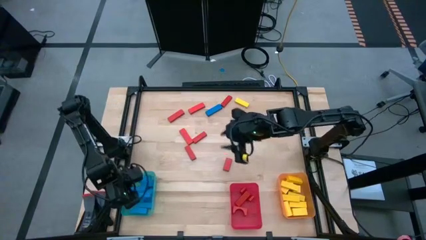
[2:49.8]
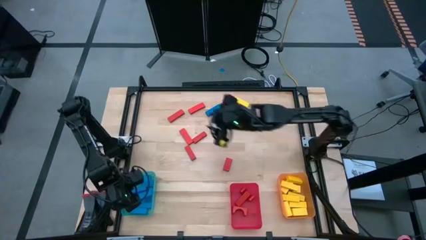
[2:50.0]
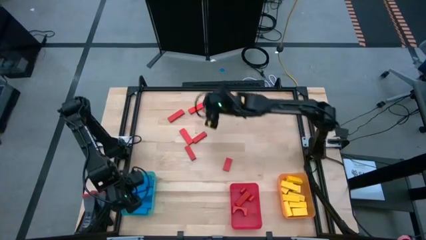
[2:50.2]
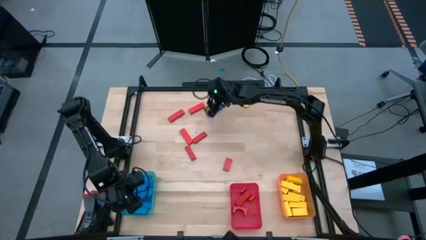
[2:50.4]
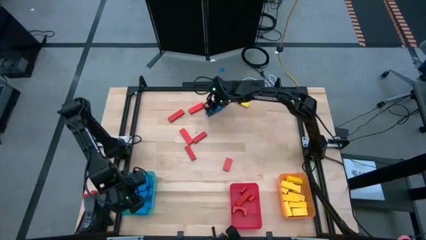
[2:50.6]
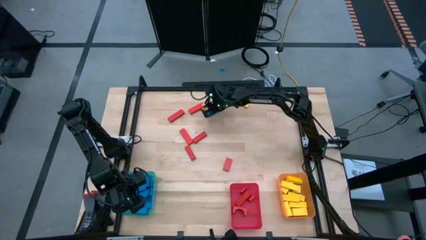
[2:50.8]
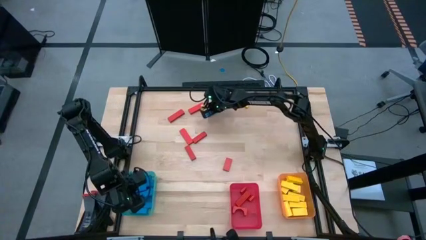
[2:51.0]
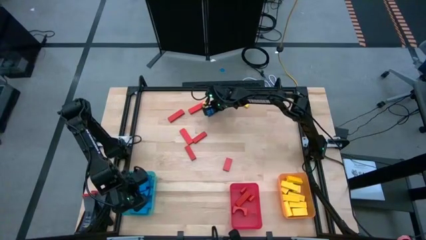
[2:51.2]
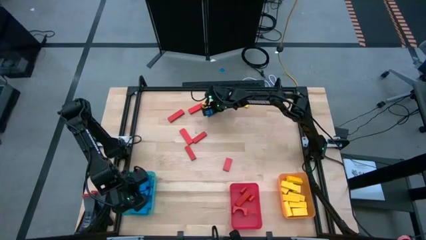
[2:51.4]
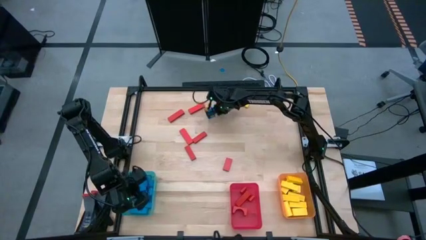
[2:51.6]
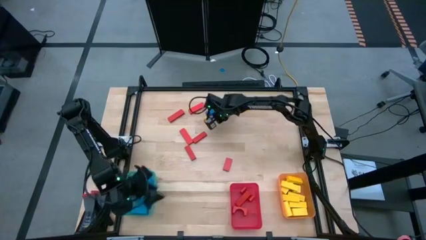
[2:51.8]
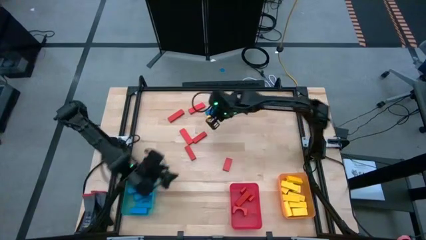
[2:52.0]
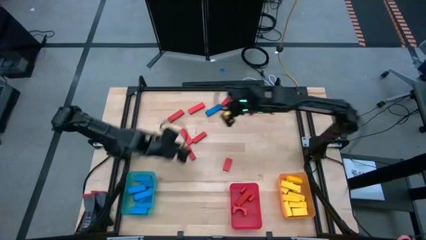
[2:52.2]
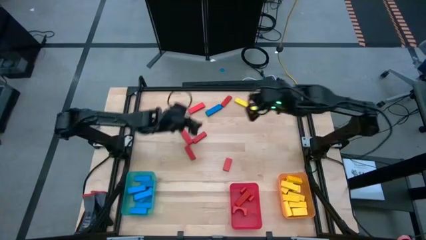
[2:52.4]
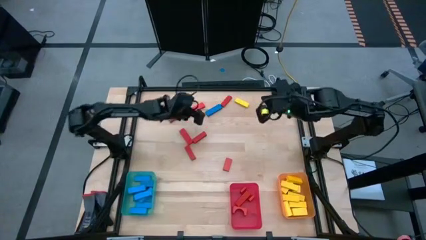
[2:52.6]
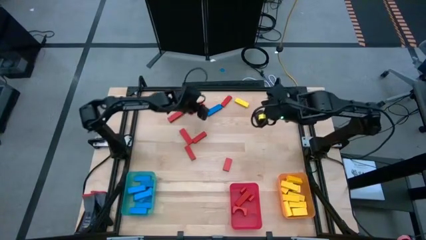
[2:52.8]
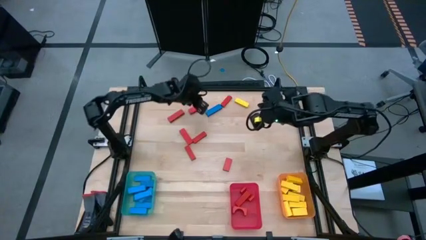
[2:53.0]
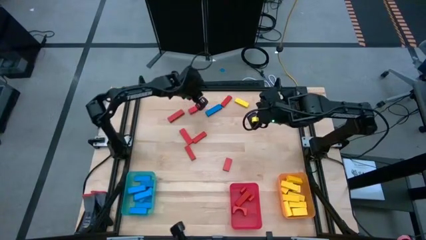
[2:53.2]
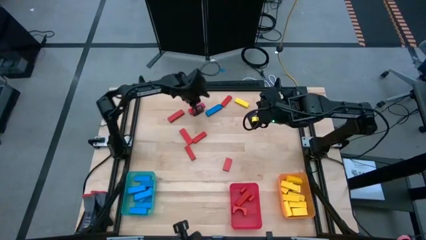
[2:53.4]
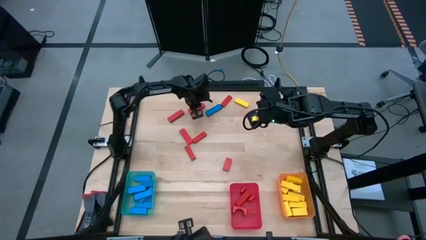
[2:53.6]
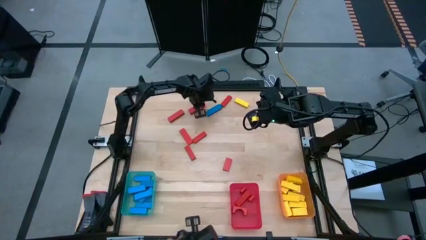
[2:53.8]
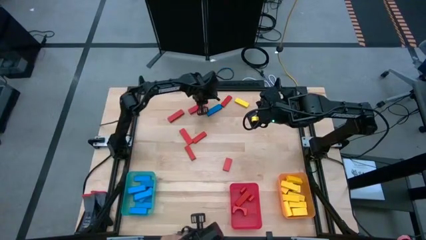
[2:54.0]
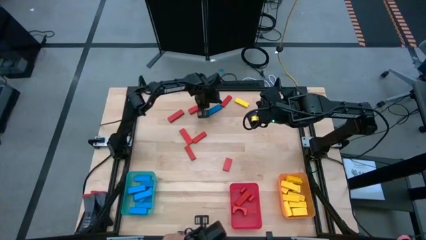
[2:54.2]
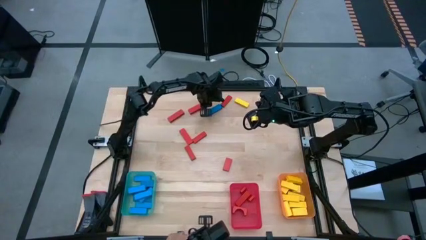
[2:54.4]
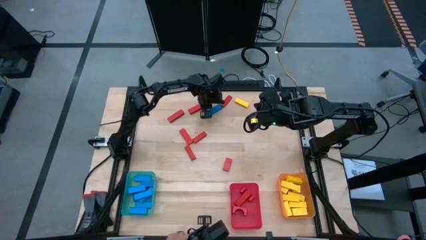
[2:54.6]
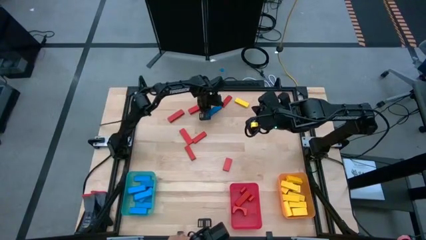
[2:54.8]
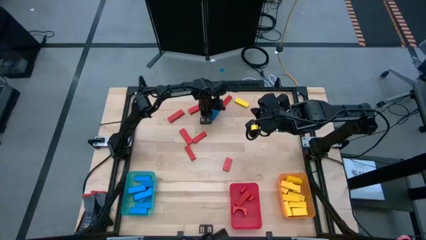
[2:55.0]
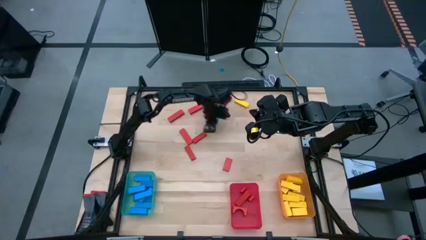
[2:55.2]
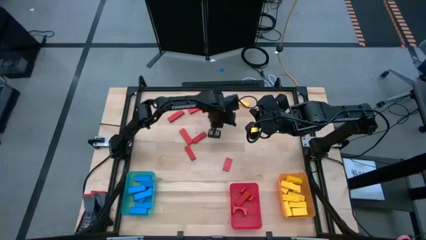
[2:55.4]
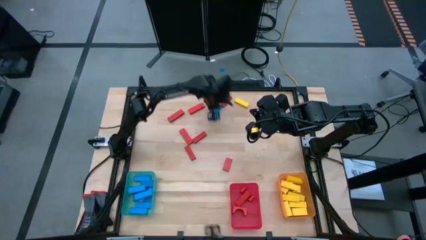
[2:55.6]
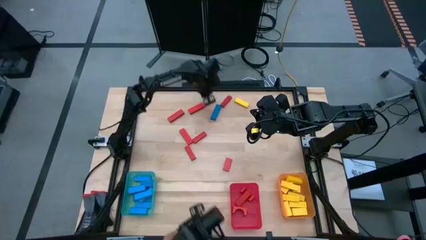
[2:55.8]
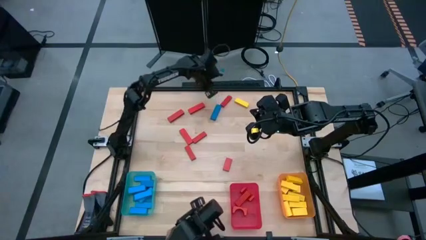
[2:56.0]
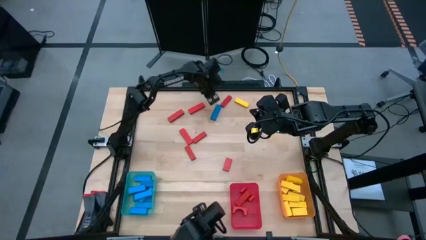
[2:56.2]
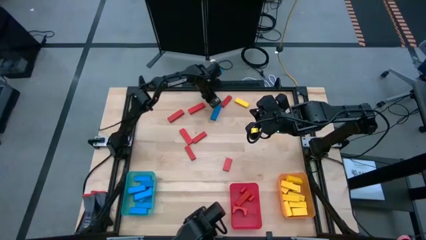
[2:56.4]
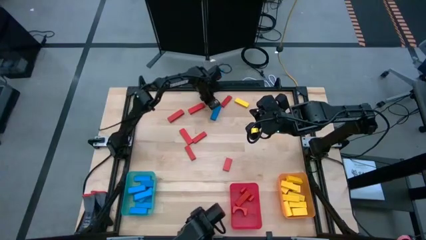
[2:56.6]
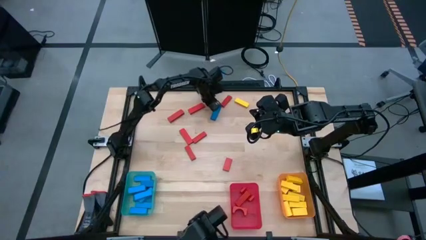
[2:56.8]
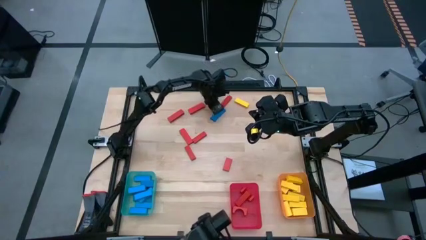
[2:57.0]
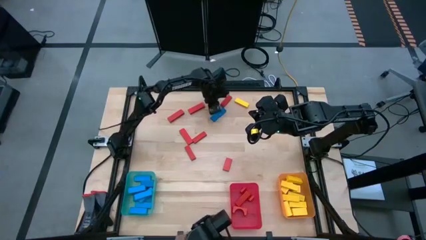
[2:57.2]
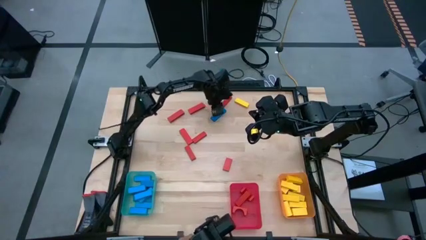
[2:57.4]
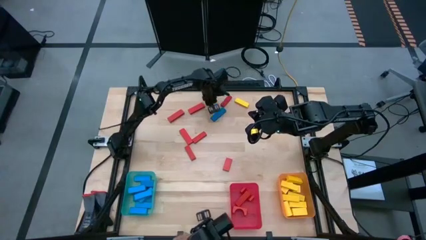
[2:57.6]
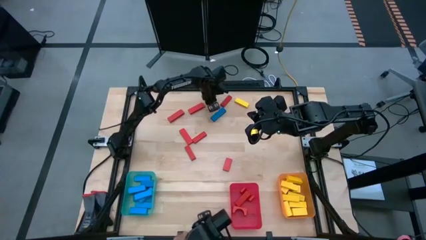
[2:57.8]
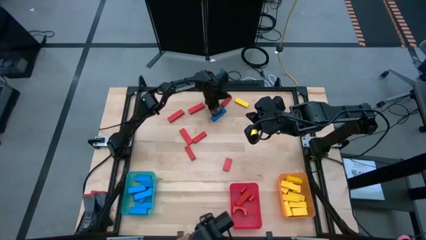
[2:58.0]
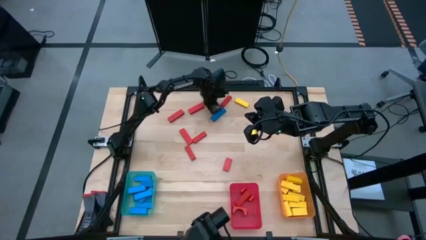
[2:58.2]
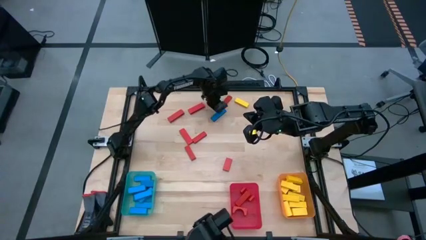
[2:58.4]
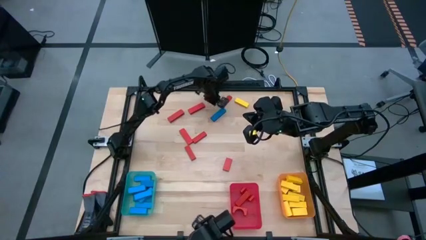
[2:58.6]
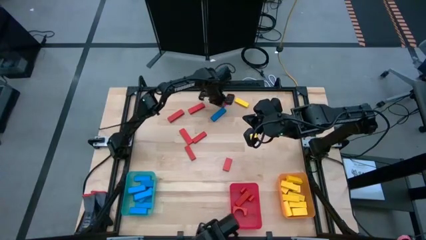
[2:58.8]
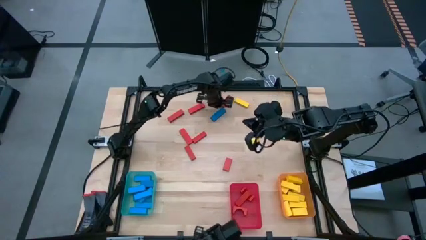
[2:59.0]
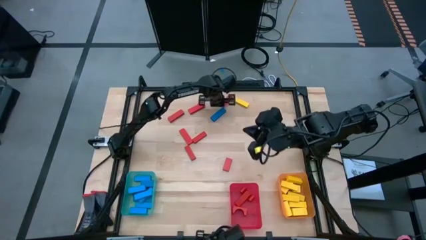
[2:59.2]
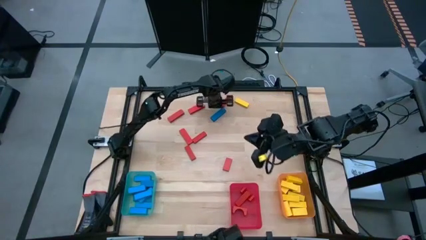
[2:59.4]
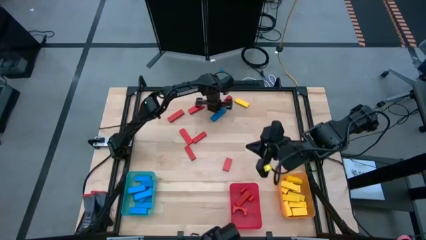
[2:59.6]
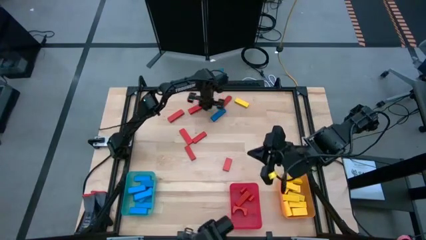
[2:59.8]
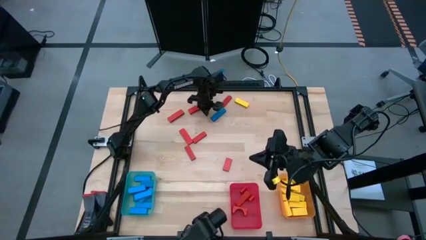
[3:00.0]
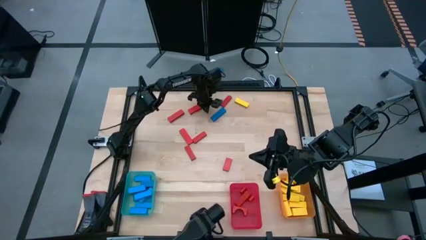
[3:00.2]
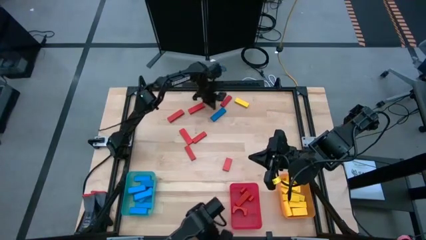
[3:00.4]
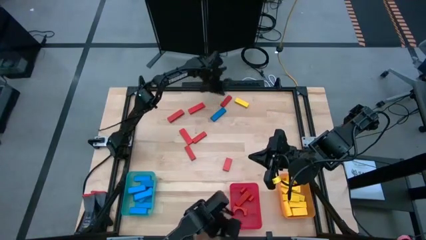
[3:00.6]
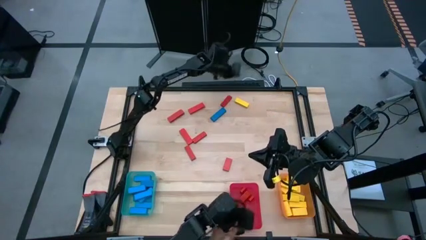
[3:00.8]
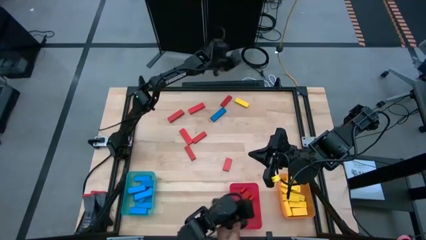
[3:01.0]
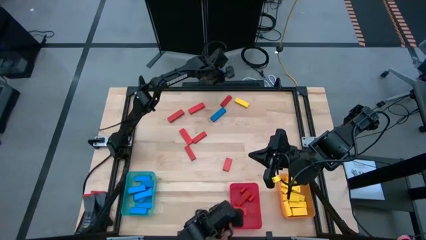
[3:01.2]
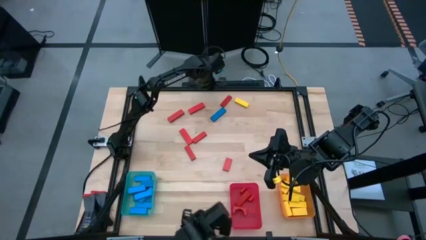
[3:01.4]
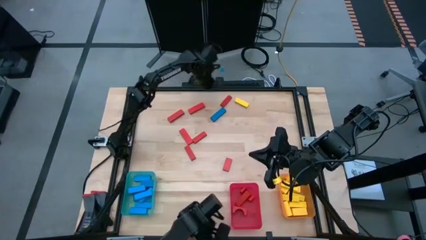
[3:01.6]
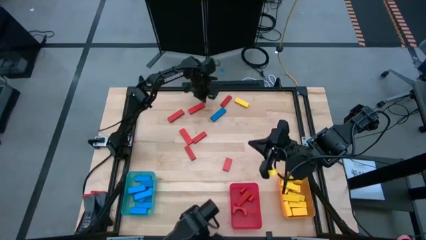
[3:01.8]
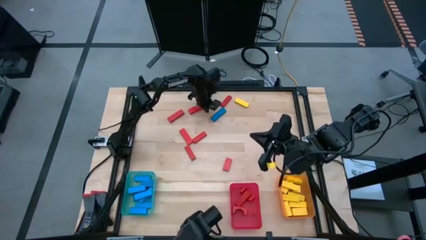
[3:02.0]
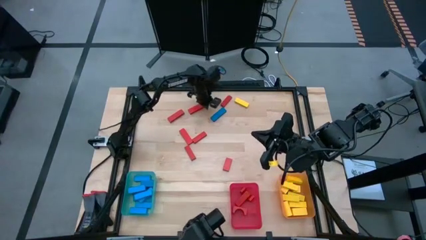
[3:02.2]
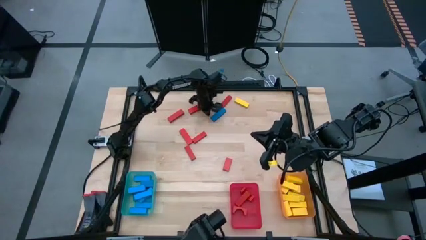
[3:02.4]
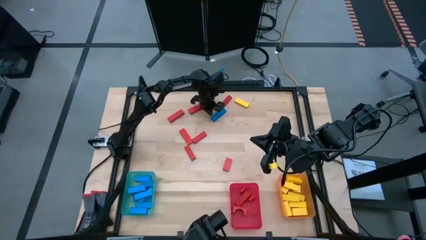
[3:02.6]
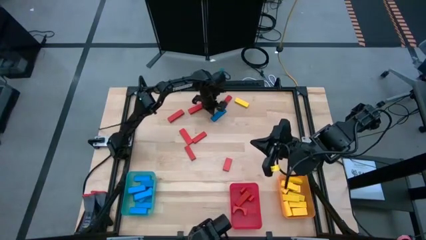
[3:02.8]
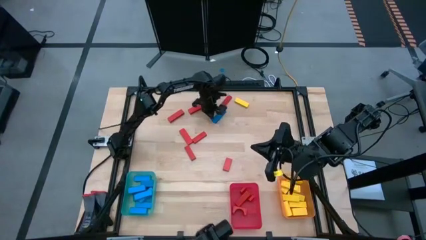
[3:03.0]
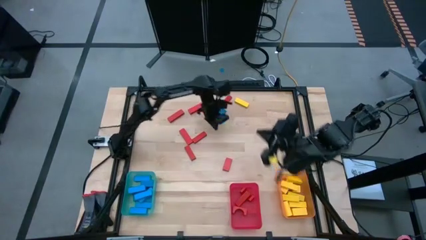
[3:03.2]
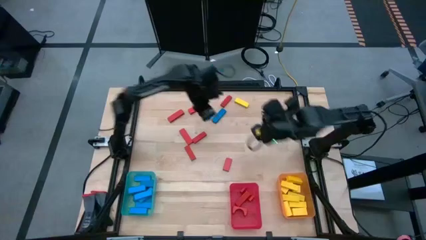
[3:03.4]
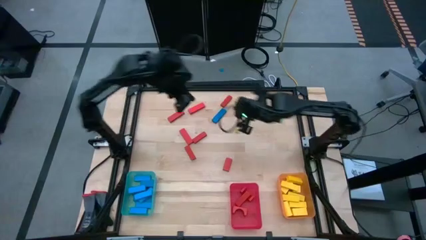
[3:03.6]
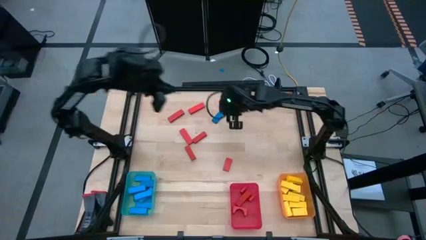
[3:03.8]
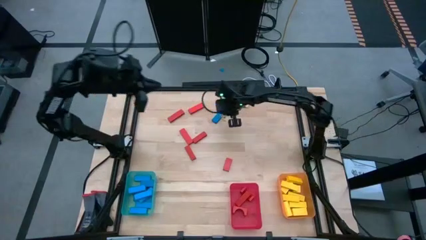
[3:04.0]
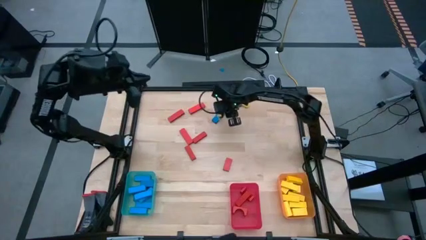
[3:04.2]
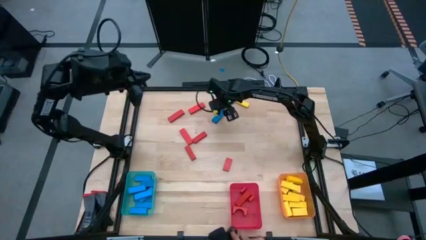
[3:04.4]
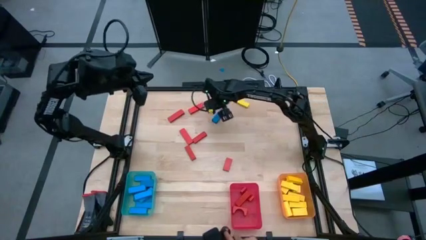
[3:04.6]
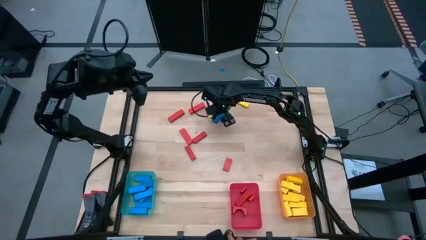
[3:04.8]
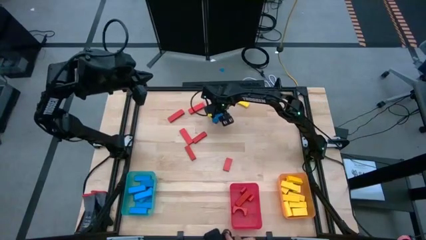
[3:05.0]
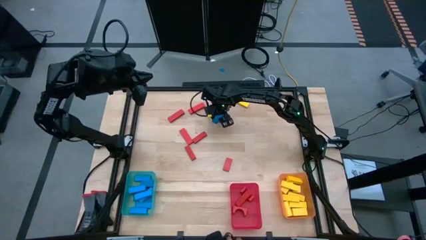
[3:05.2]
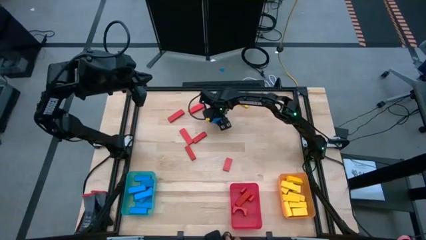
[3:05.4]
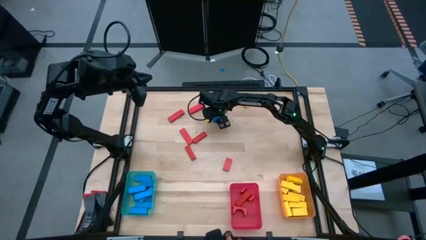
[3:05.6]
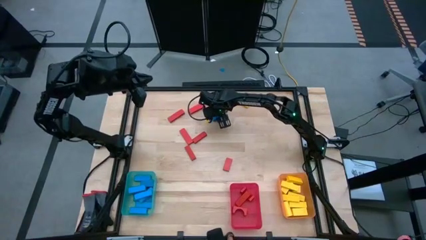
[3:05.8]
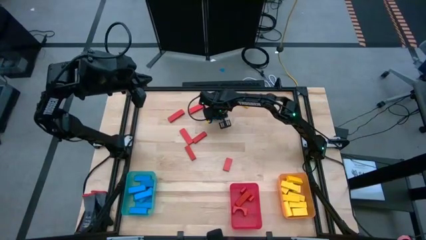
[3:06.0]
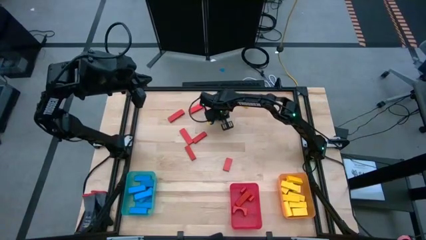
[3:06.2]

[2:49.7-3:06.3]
Task: Sort blocks
Put the blue block into the blue bin
